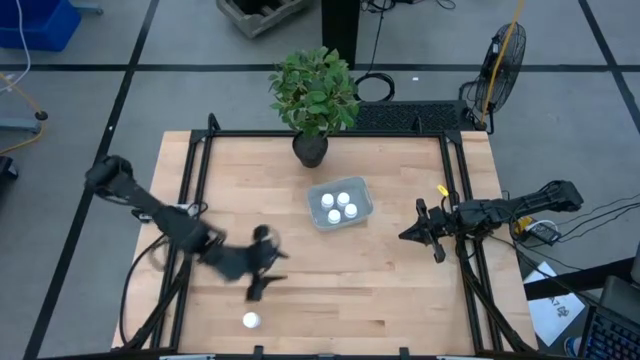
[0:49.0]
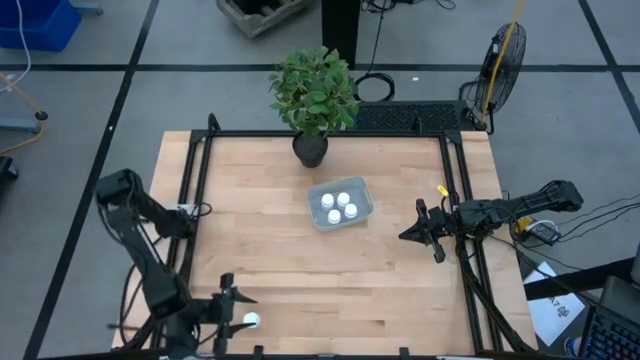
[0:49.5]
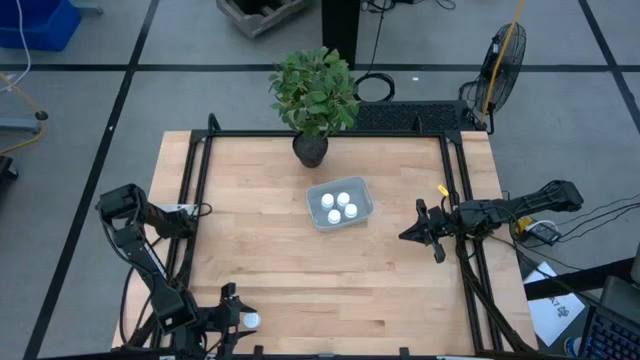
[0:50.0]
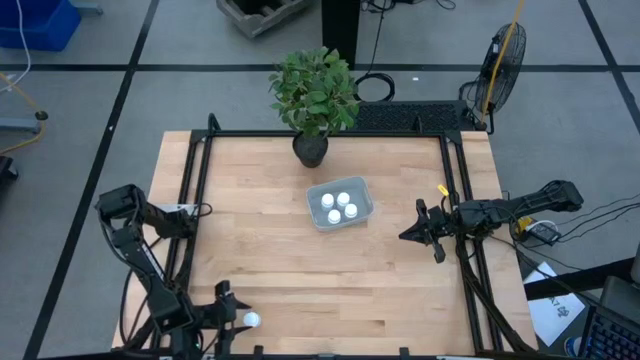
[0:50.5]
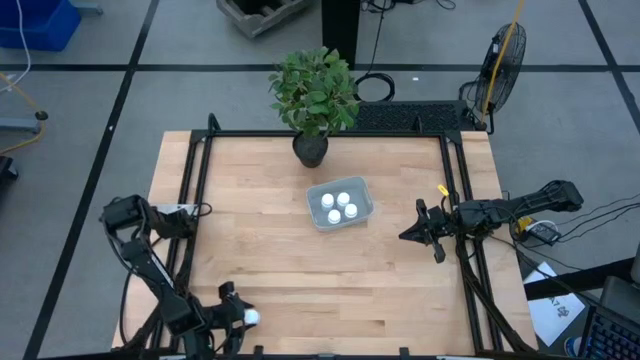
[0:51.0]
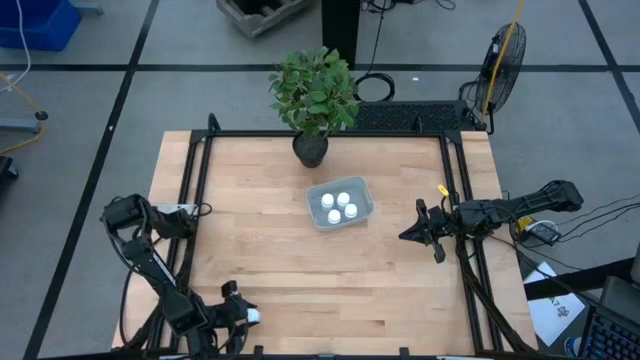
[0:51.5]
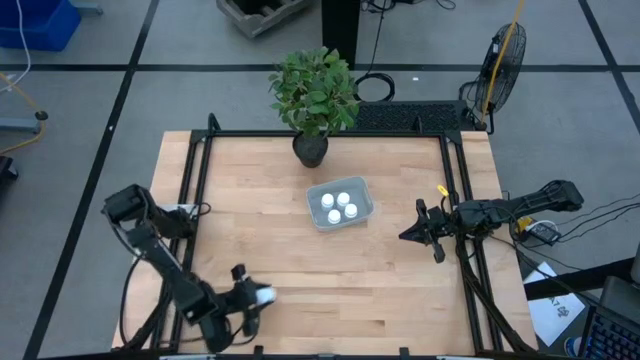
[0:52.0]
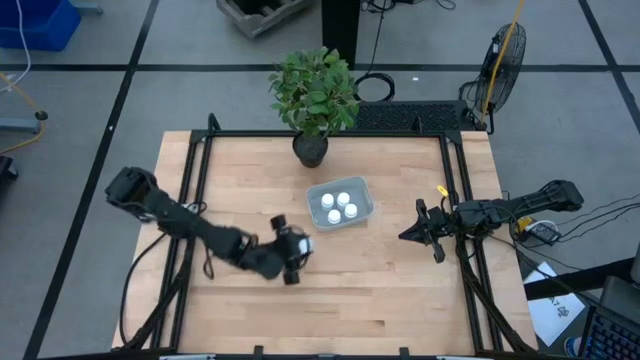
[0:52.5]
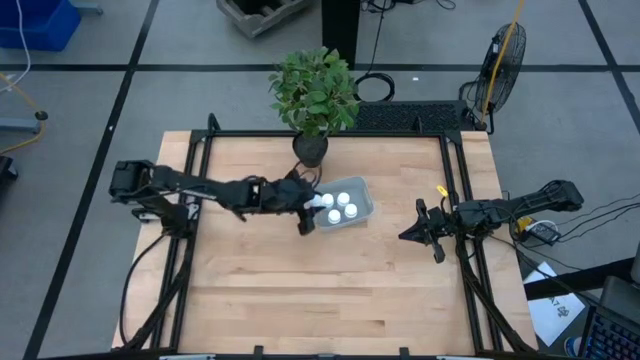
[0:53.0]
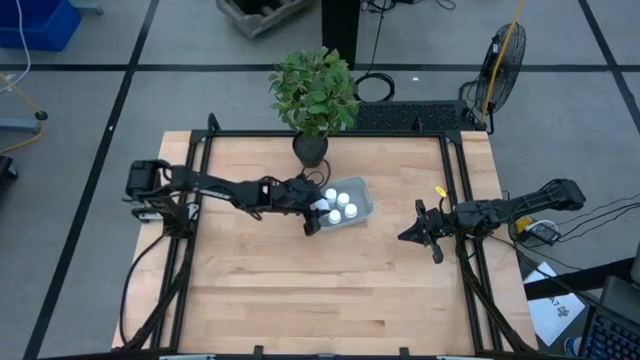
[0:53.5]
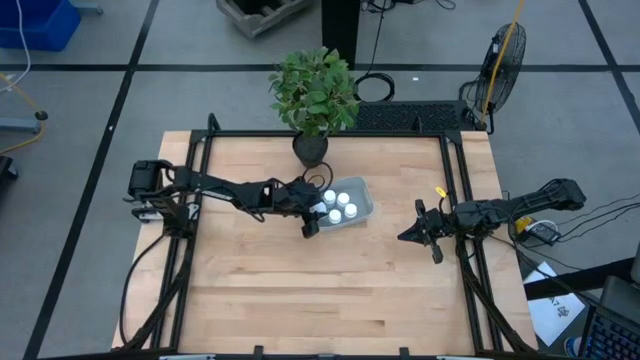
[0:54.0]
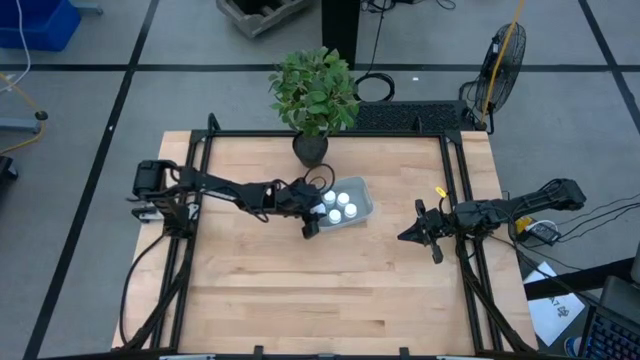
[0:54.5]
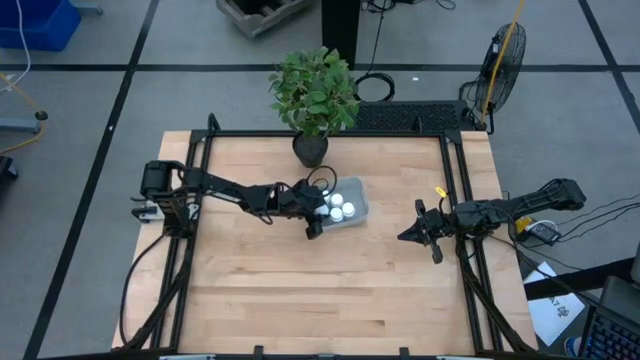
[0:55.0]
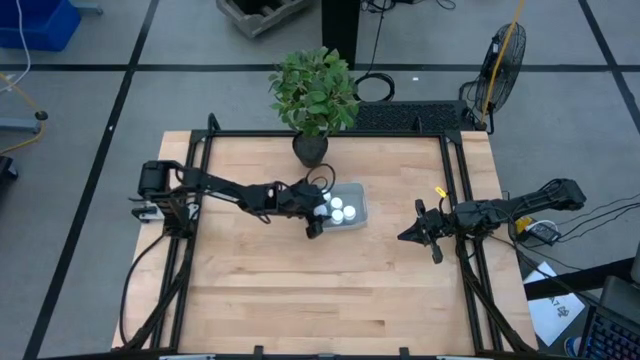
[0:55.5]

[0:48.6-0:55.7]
Task: Pick and place pill bottles into a basket
Put the white pill bottle into the gray bin

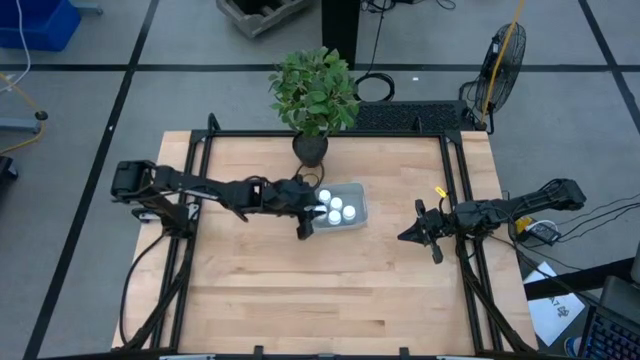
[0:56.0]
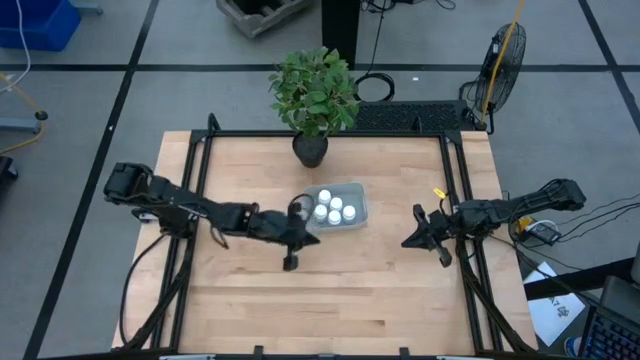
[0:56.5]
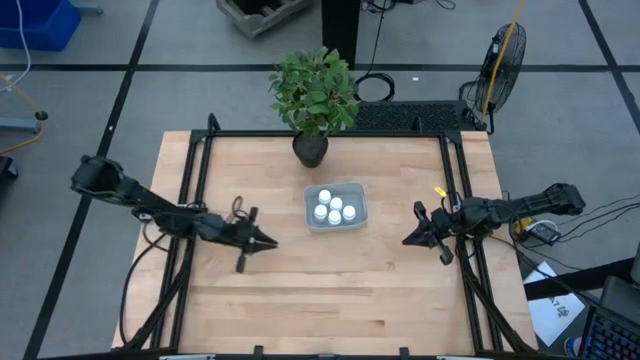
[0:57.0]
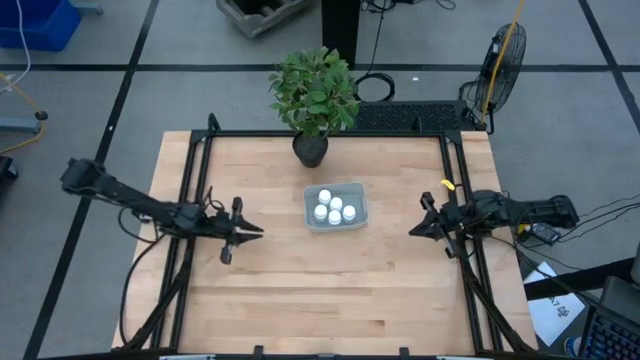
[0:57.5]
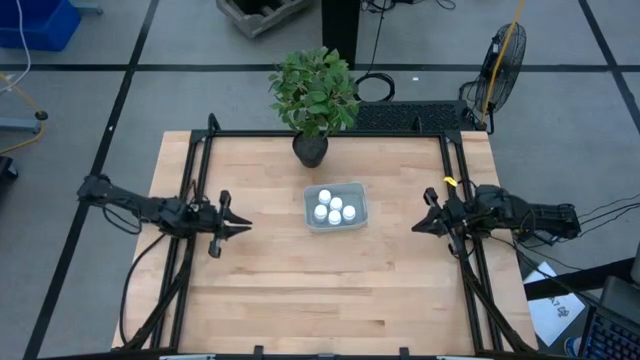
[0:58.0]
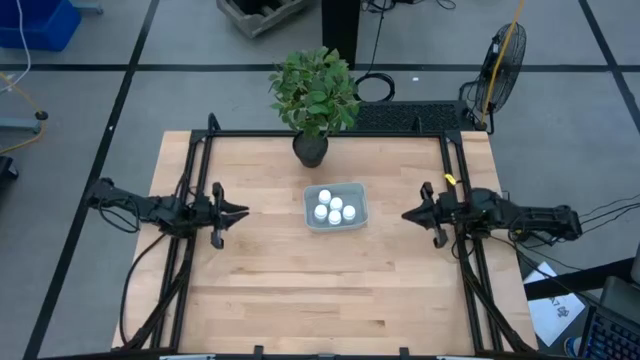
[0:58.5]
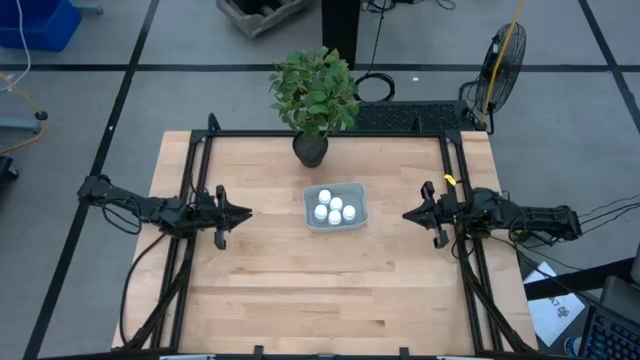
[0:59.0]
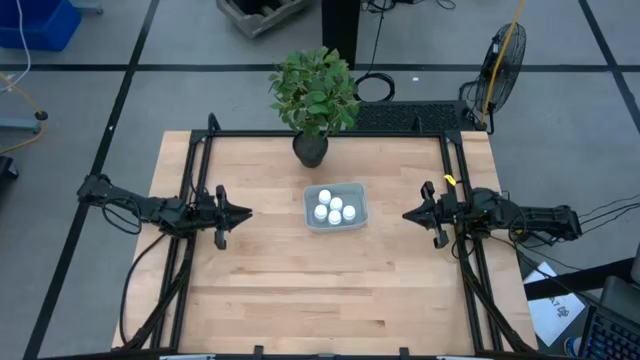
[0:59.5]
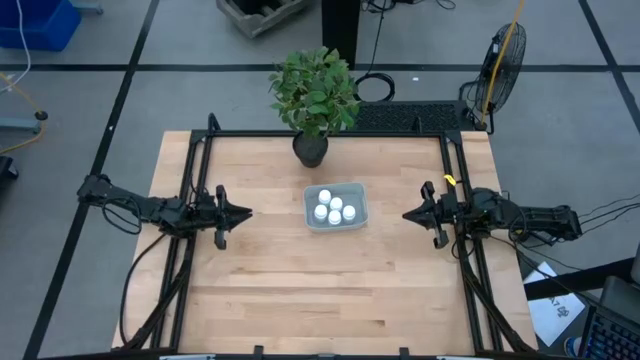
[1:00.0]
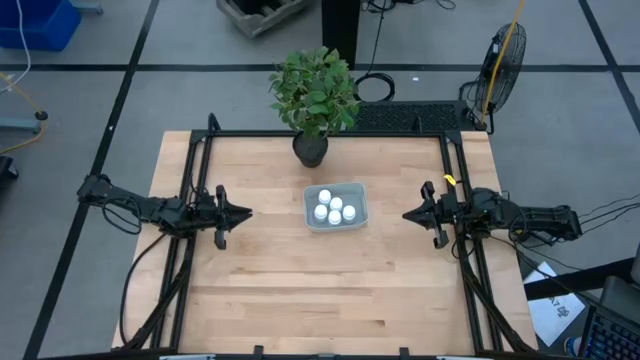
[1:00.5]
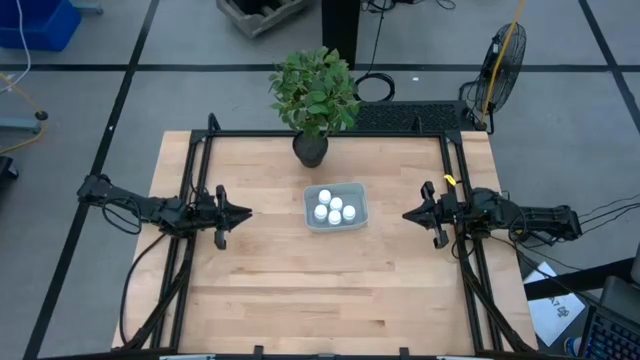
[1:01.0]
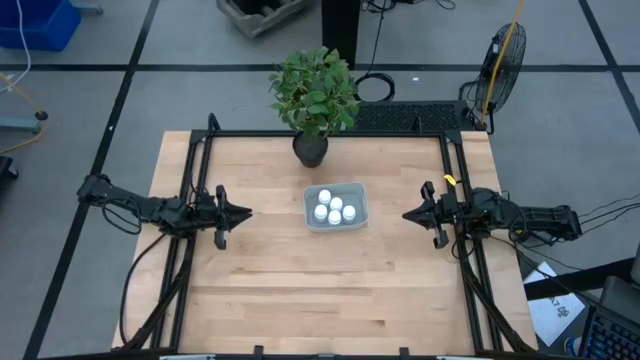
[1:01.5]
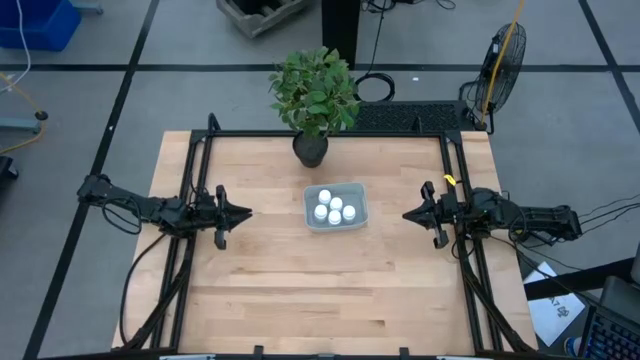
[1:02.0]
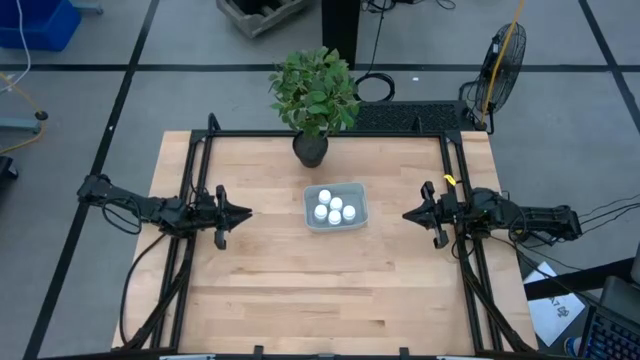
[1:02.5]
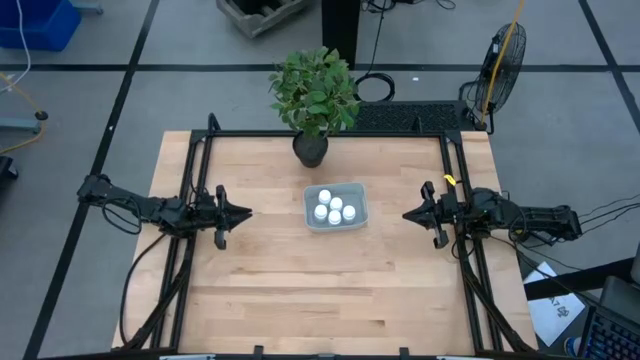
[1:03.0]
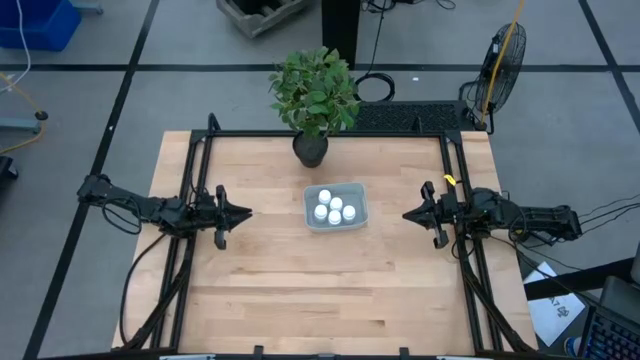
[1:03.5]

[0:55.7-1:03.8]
Return to Home Position

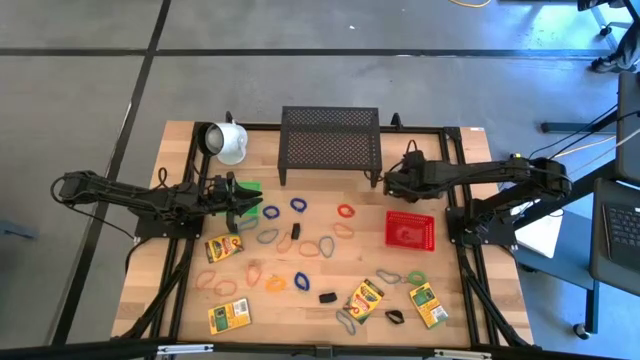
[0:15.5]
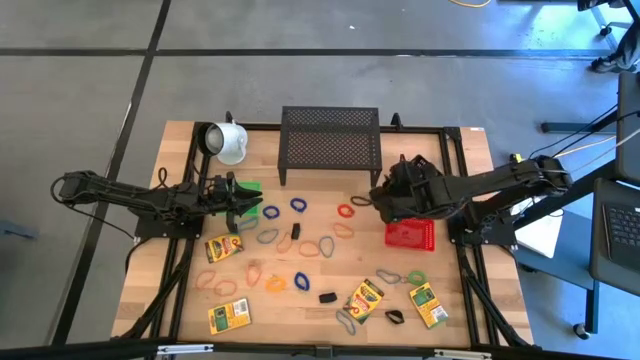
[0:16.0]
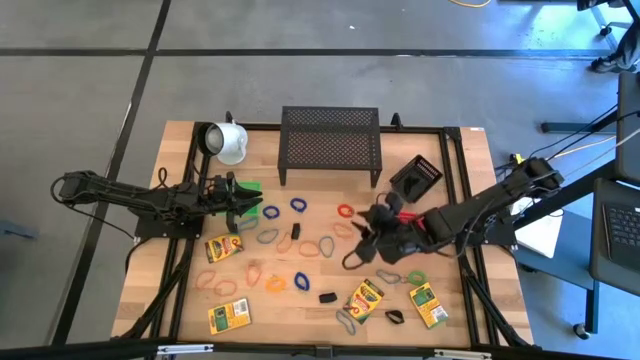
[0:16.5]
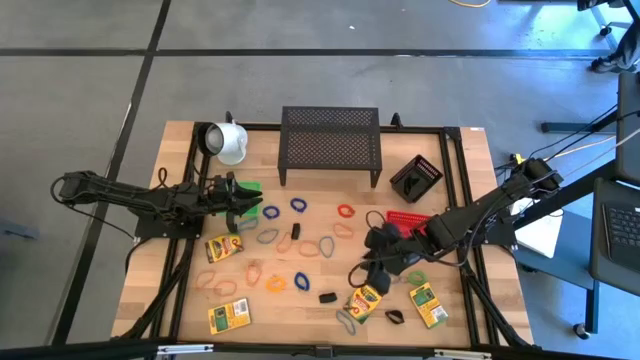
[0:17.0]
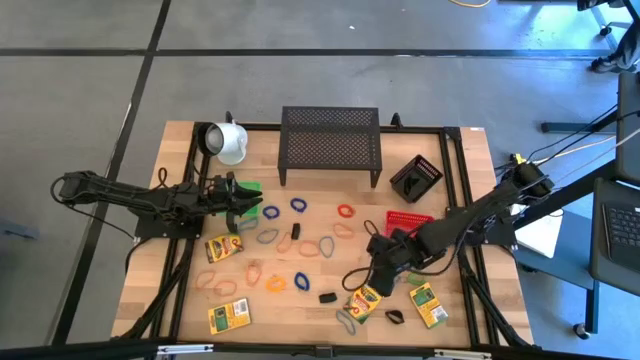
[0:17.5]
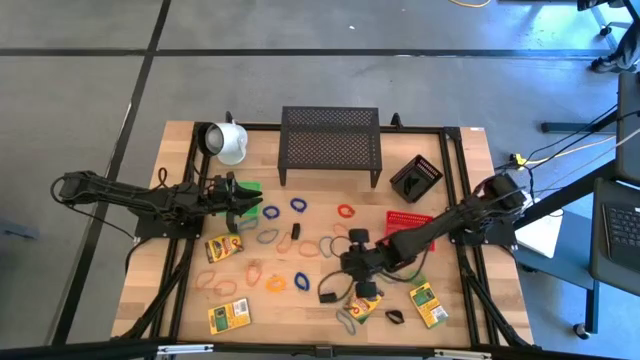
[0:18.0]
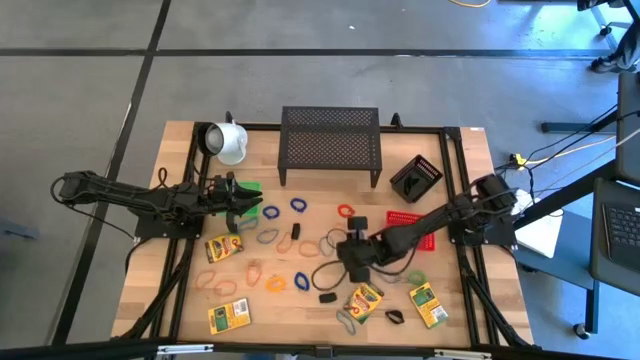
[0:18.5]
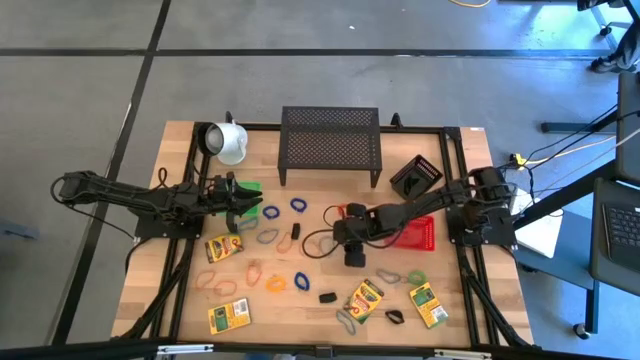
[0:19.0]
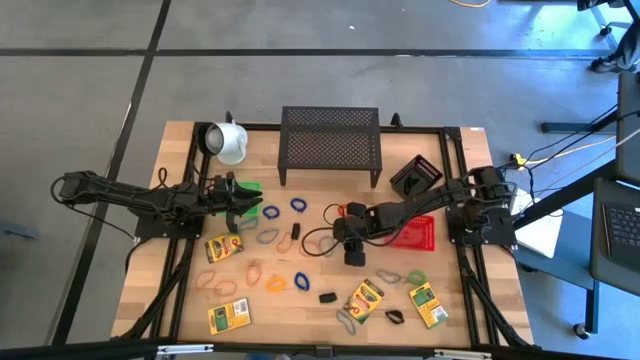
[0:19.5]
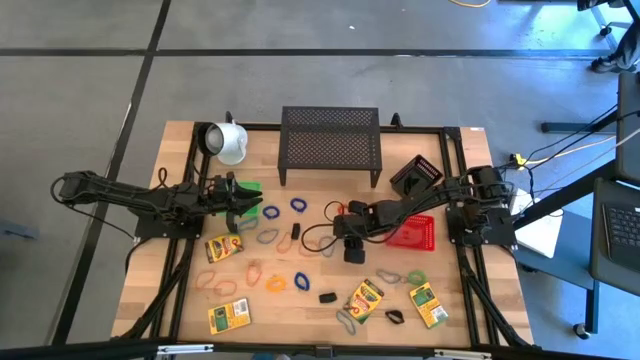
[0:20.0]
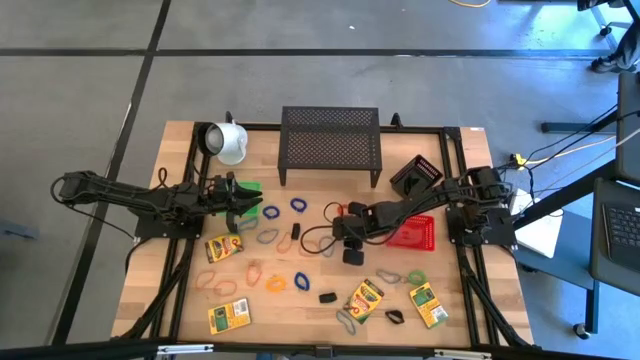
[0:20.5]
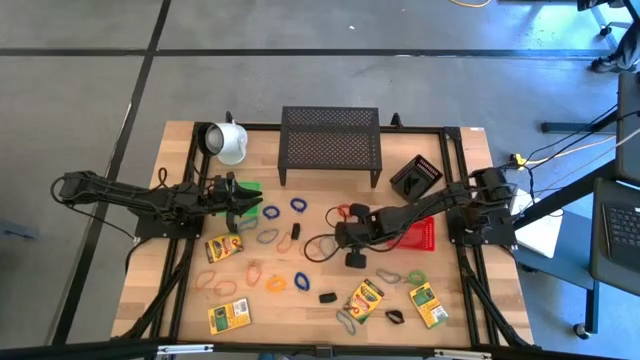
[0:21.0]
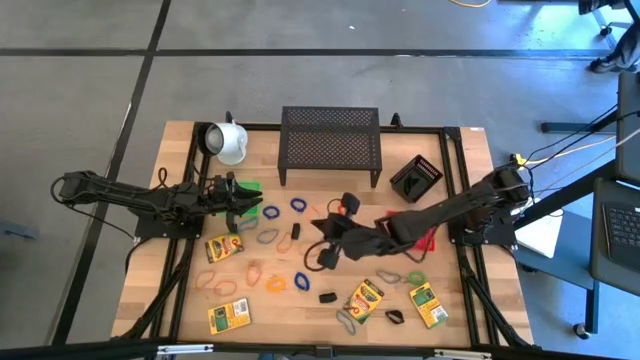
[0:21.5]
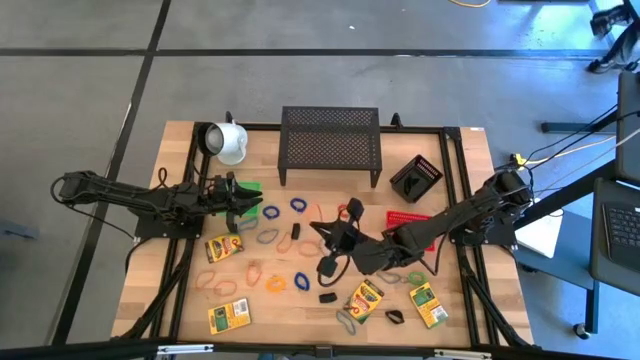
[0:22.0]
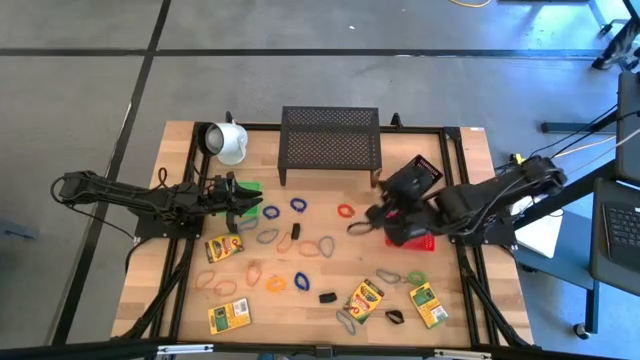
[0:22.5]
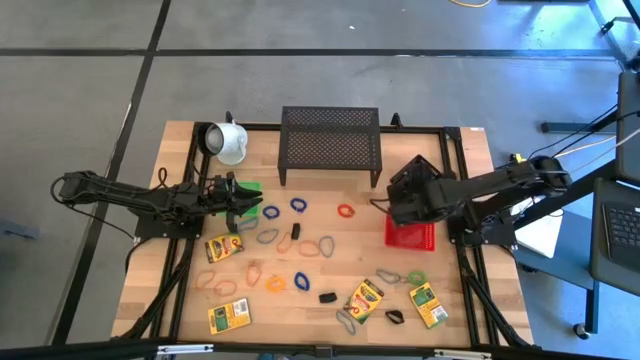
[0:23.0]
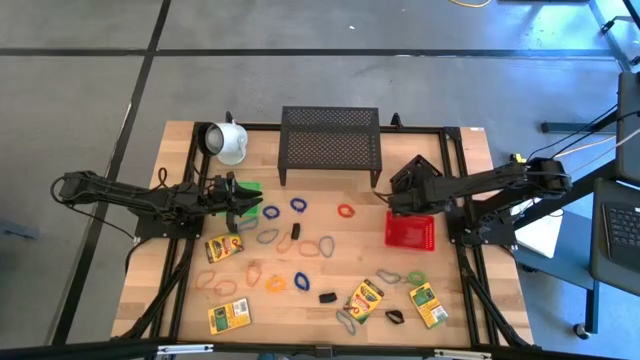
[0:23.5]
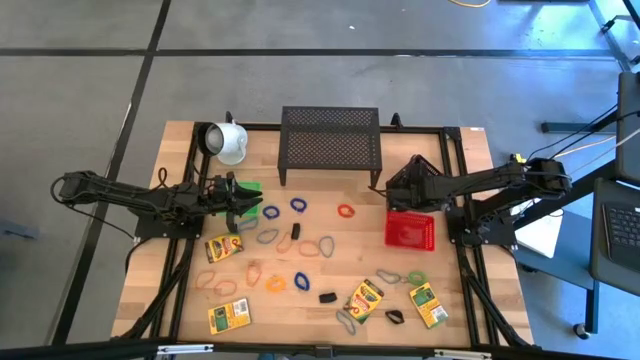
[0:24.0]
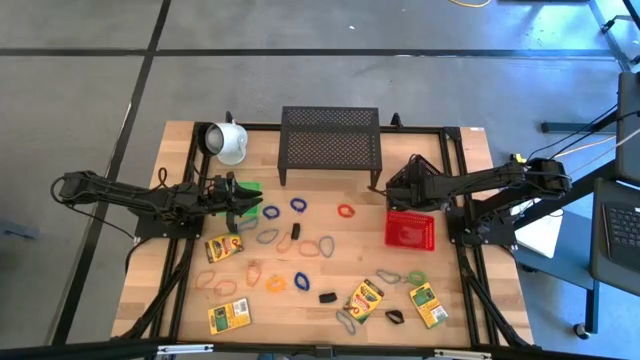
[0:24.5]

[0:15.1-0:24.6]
Task: Pick & Place Office Desk Supplies
Put the orange rubber band into the black bin
